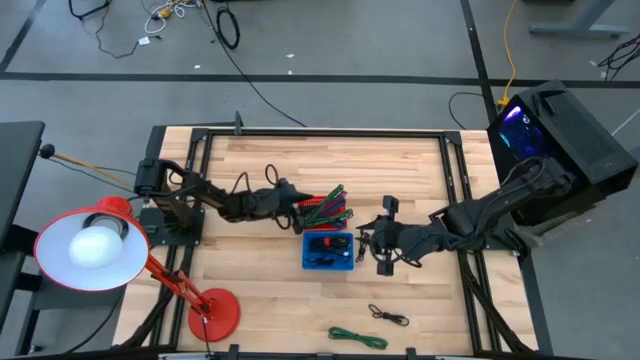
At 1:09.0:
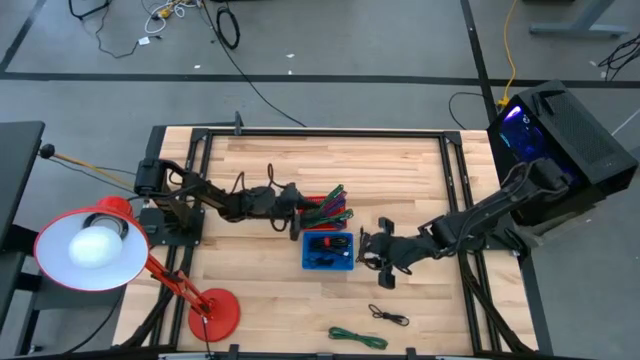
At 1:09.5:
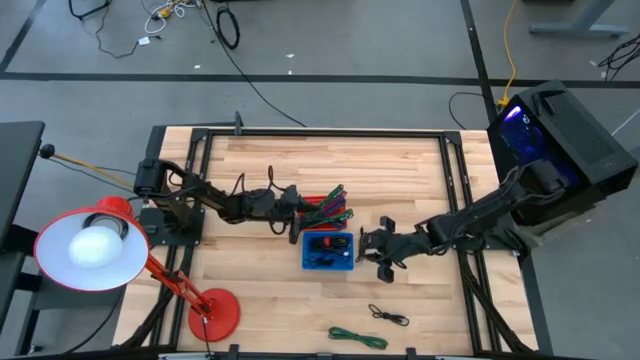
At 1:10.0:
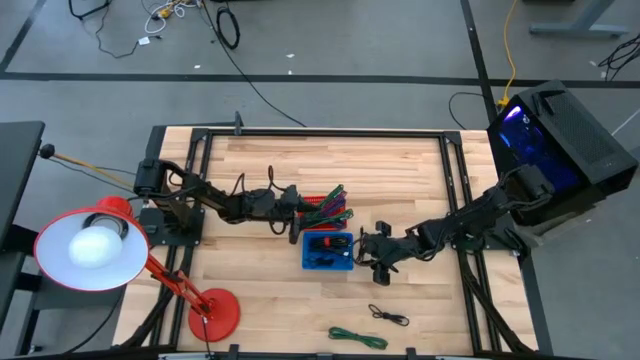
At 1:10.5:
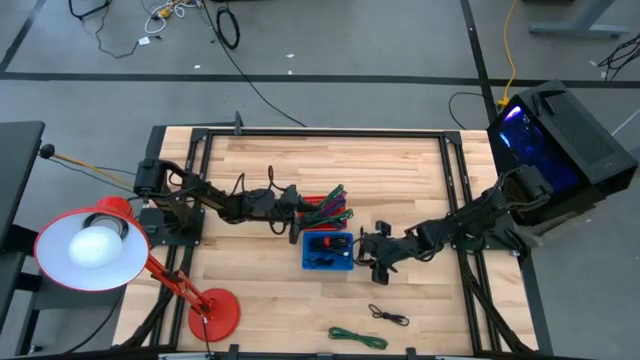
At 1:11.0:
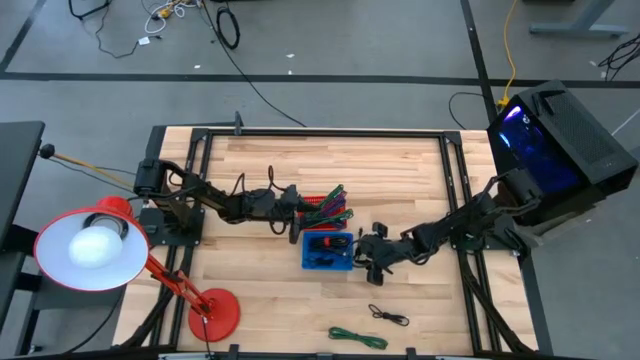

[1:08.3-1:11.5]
Task: Pick & Place USB Port
Put the black charger cable into the blue bin

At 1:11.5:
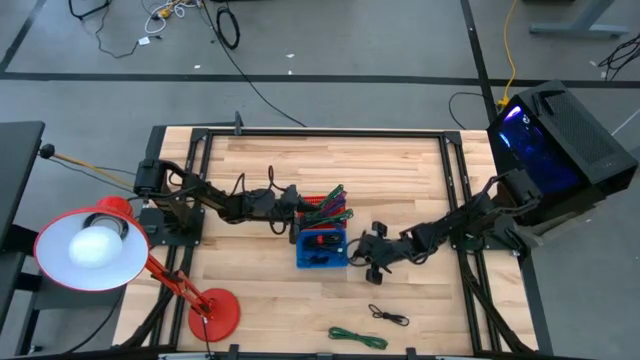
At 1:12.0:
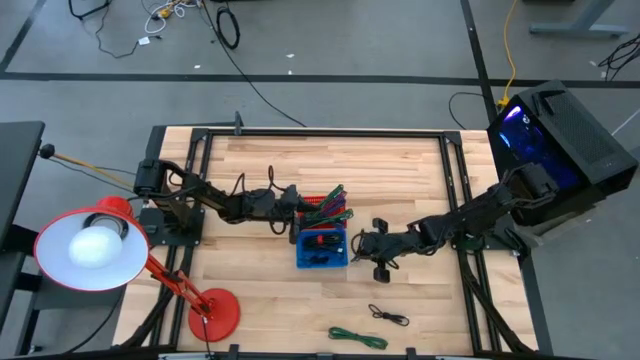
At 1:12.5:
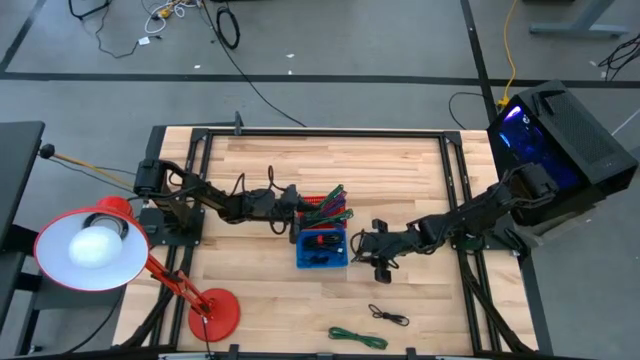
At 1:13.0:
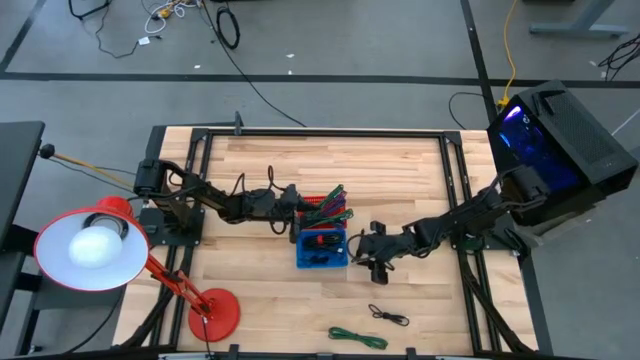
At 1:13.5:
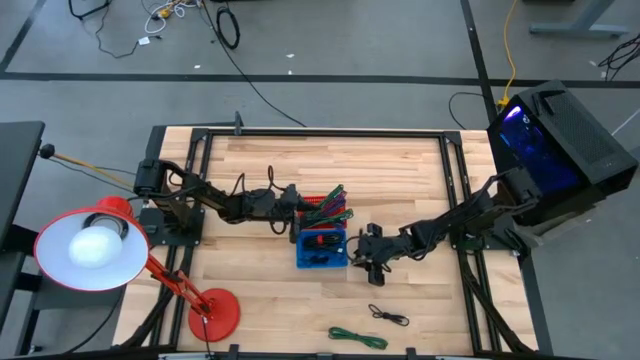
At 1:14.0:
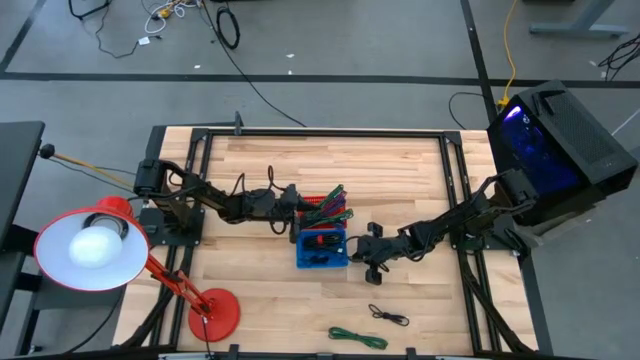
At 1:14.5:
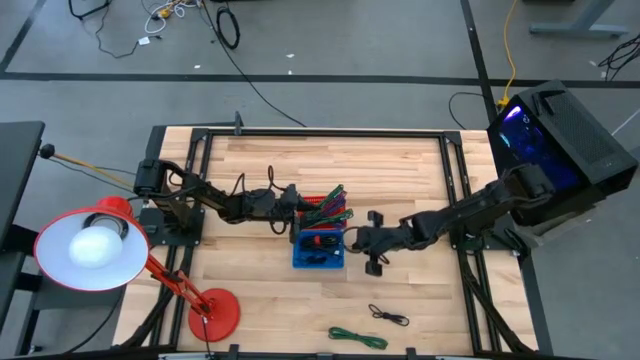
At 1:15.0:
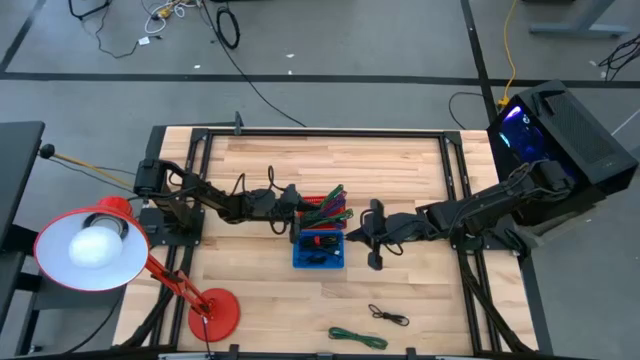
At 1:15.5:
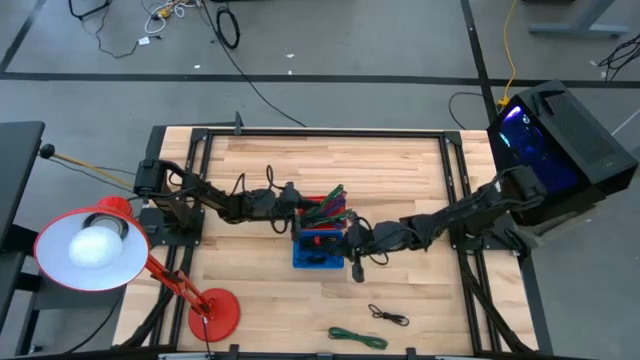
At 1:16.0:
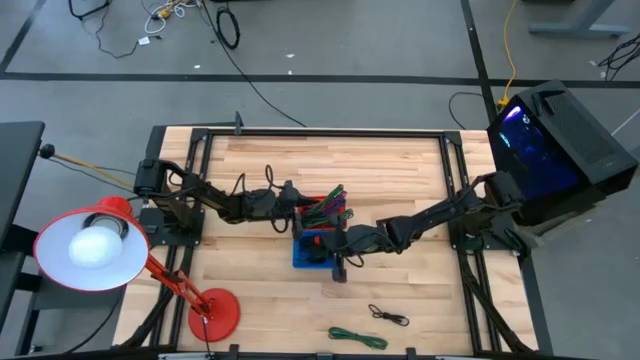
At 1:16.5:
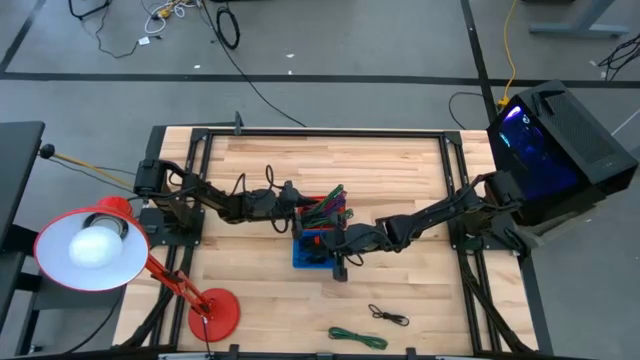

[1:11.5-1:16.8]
Put the black charger cable into the blue bin

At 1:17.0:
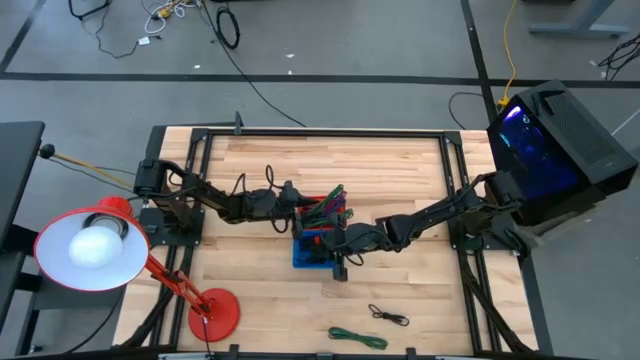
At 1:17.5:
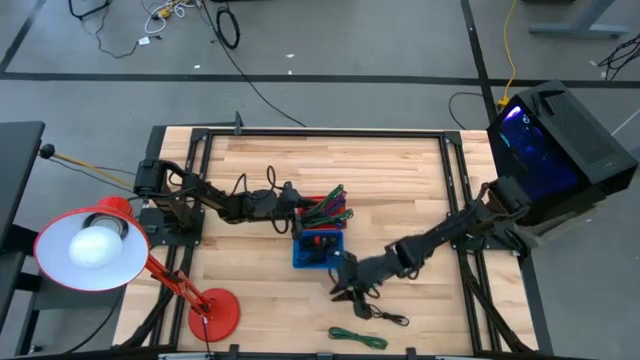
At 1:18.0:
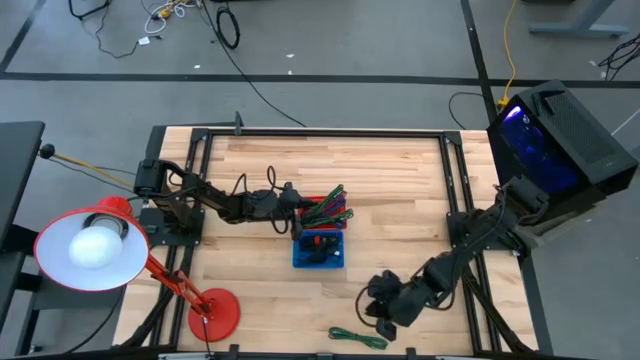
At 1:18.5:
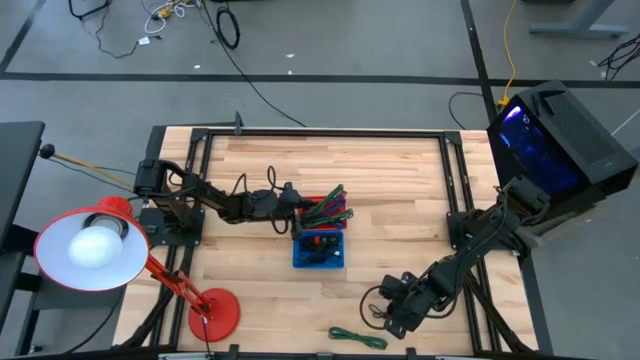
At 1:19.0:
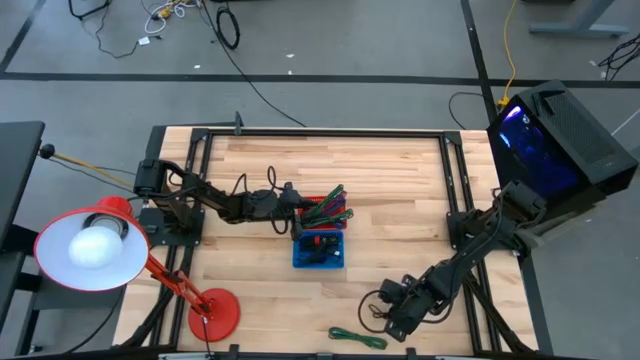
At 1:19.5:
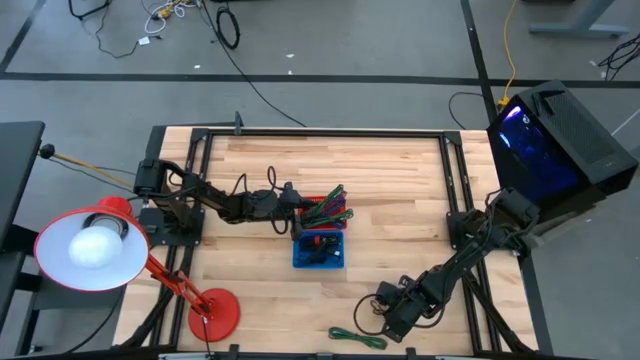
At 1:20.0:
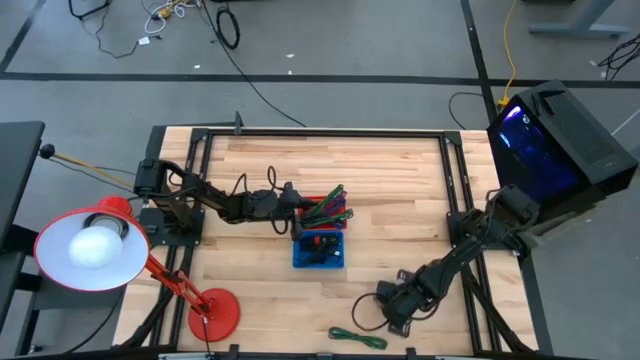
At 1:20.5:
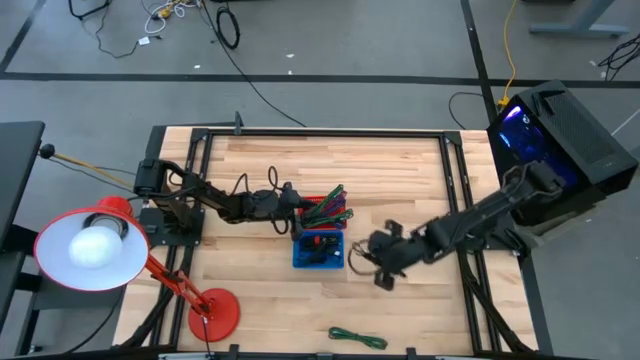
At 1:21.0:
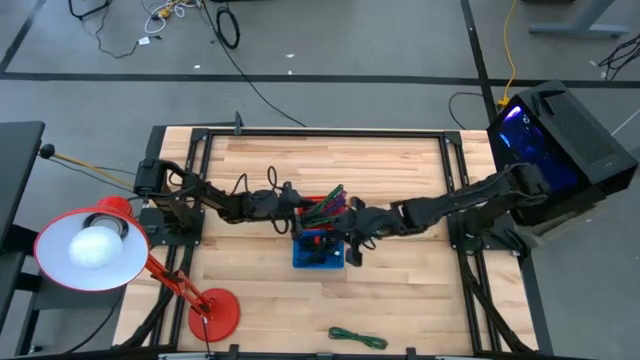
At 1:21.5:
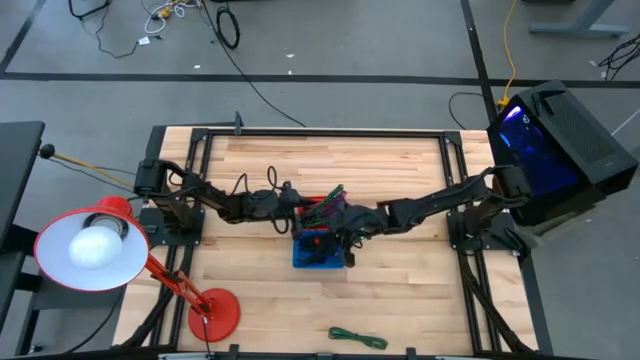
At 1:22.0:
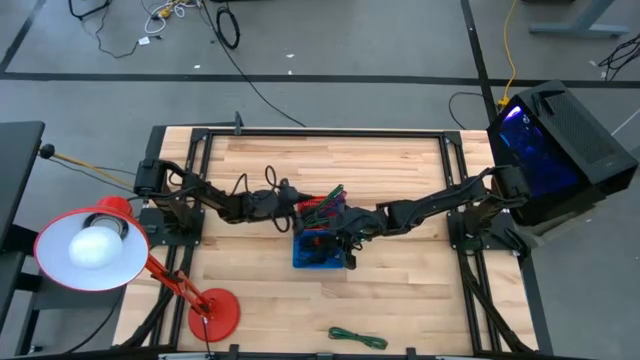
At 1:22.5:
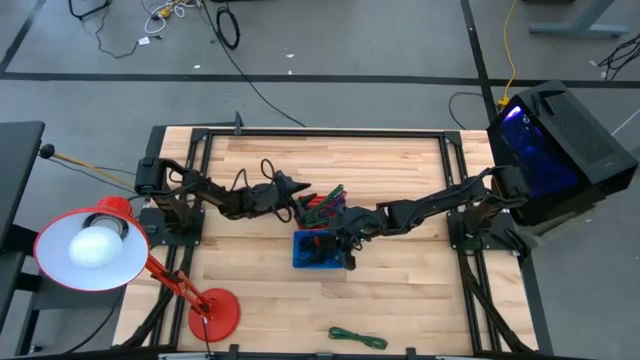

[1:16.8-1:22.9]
Put the black charger cable into the blue bin

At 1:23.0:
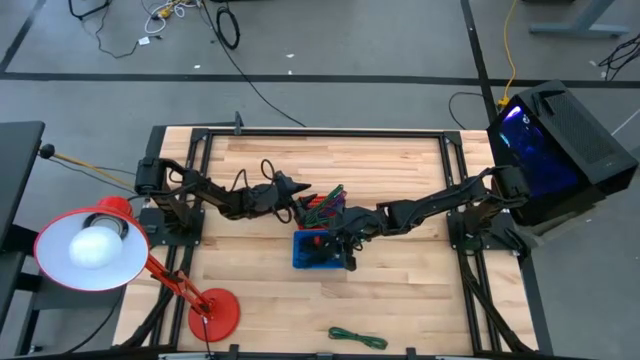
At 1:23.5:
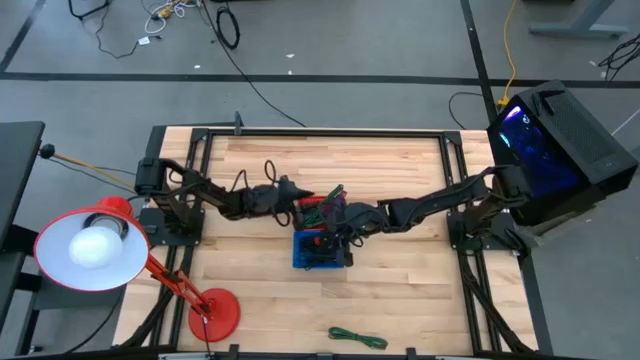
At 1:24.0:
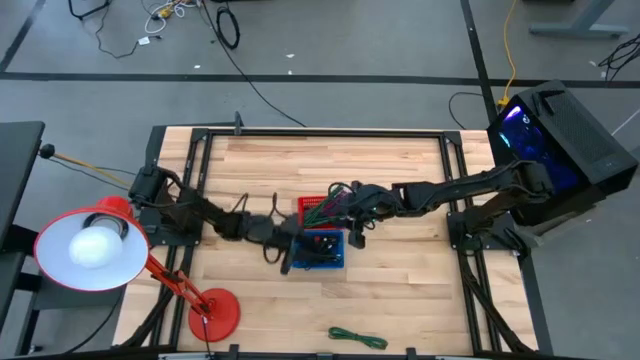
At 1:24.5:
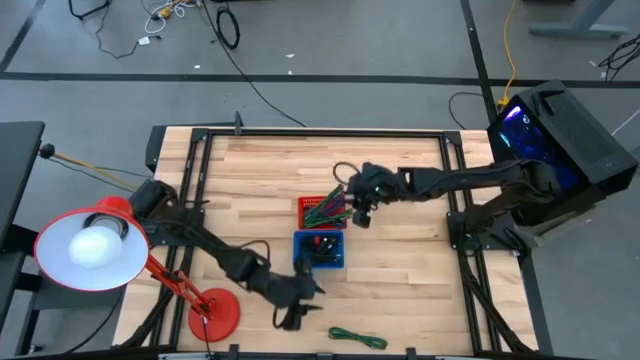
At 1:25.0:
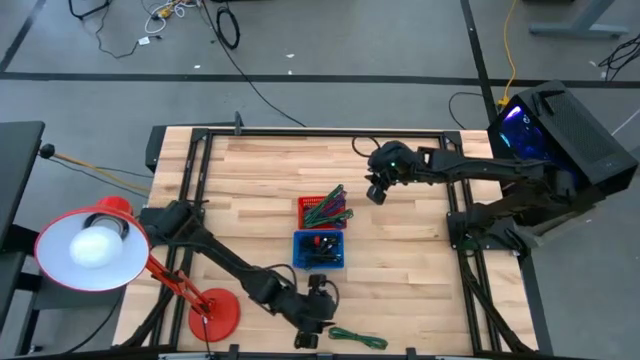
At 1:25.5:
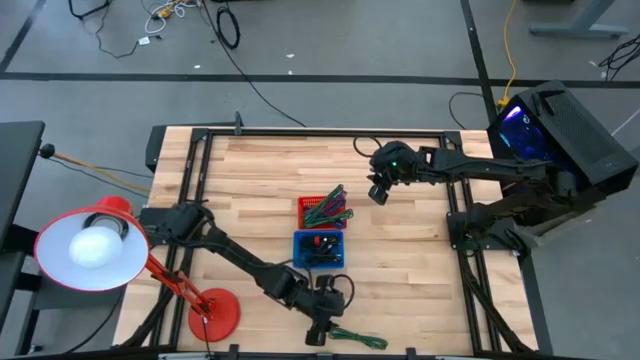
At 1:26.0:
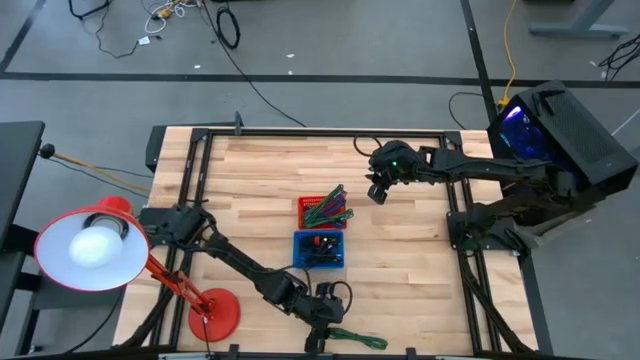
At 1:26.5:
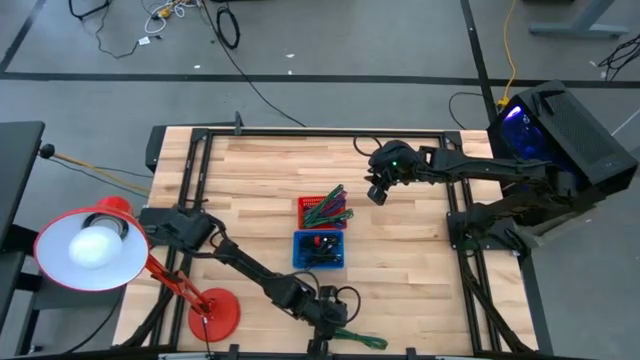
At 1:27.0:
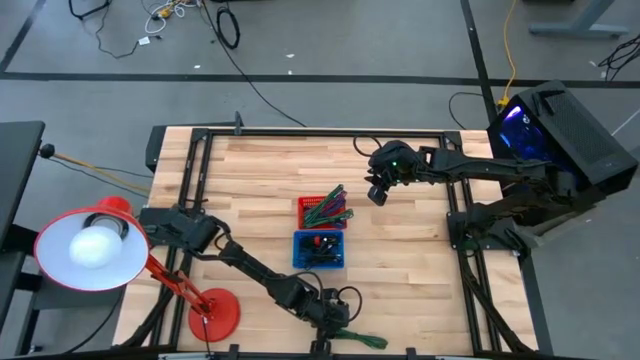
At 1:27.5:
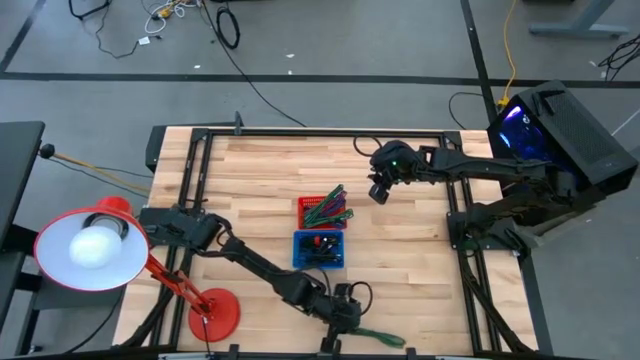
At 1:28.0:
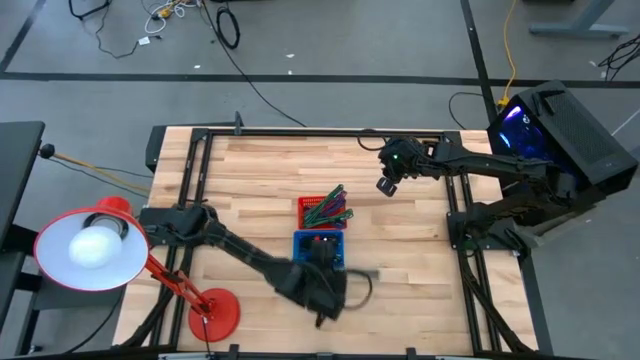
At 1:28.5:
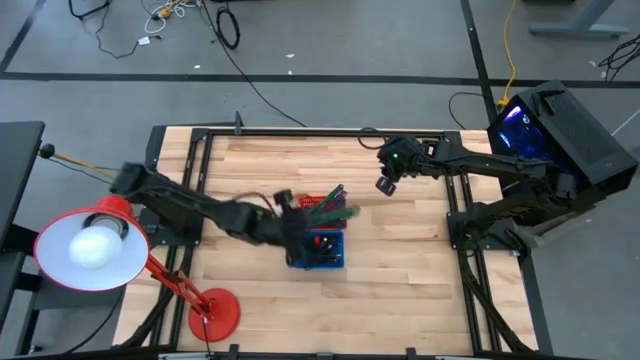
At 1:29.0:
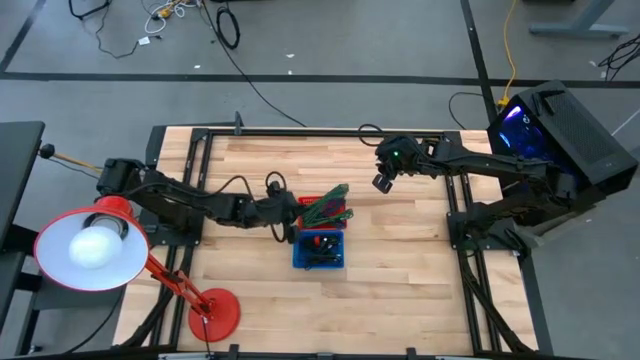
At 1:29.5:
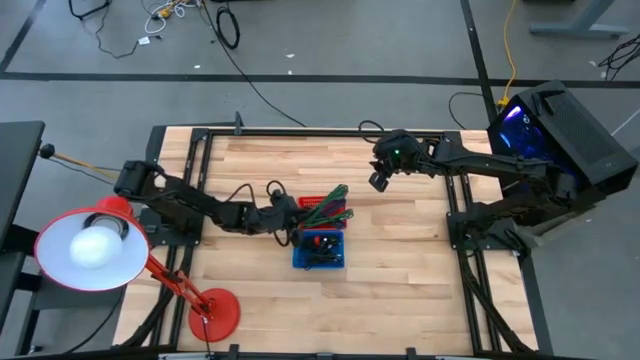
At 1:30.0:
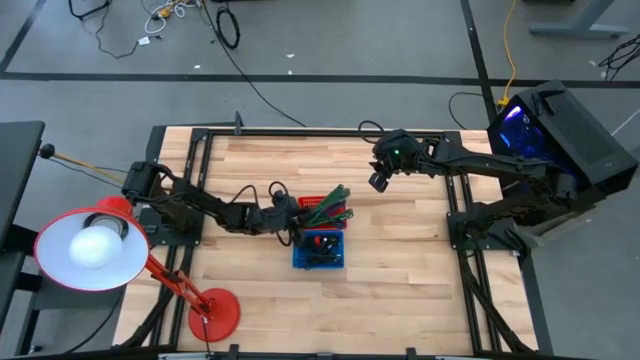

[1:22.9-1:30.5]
Put the green charger cable into the red bin
